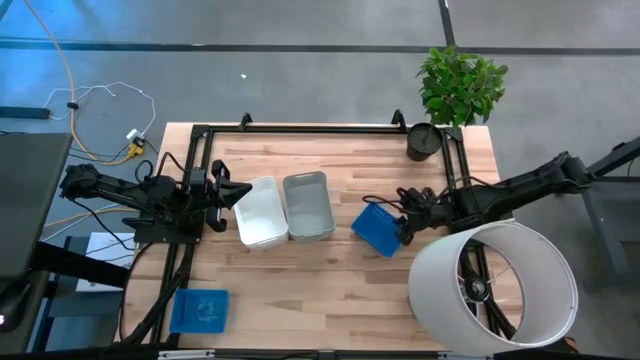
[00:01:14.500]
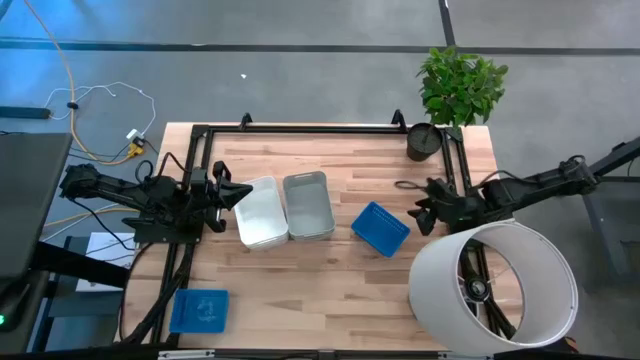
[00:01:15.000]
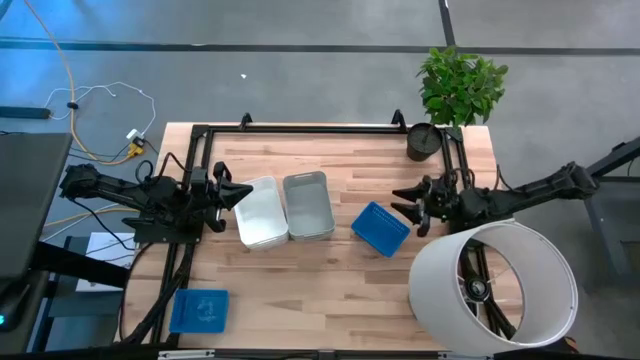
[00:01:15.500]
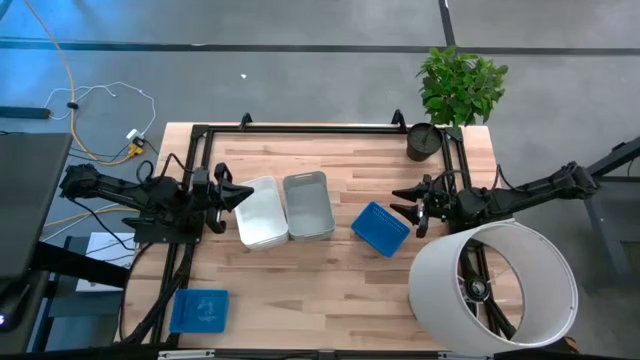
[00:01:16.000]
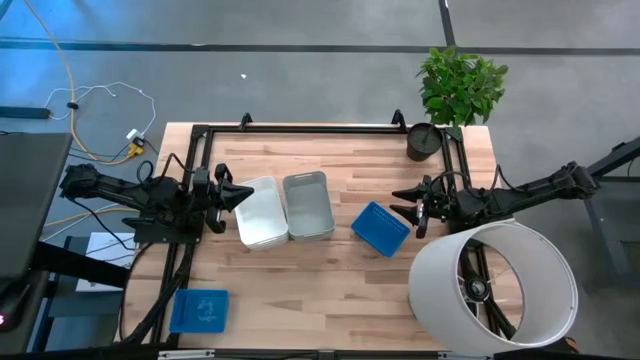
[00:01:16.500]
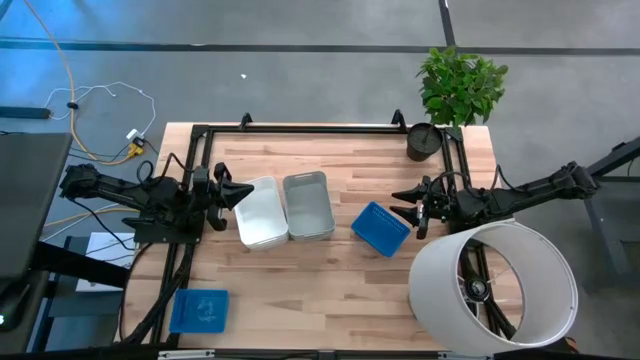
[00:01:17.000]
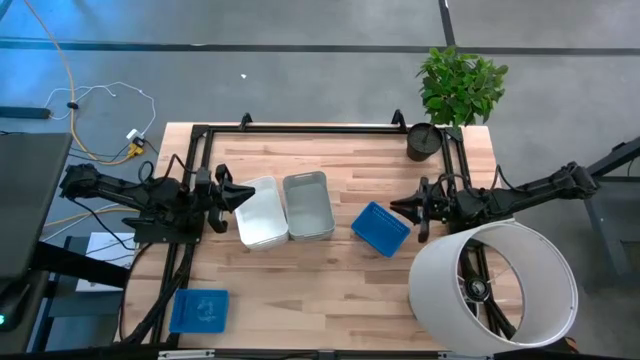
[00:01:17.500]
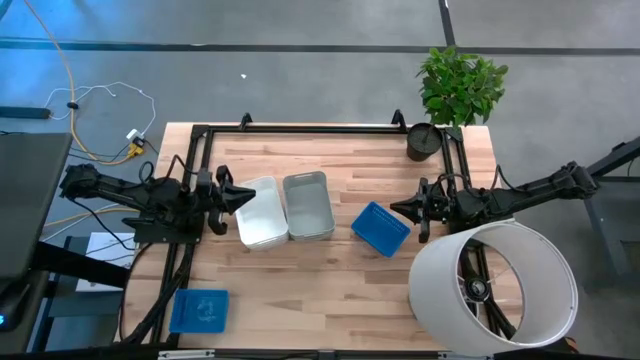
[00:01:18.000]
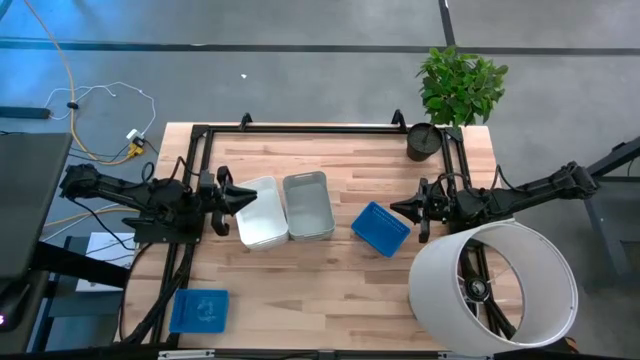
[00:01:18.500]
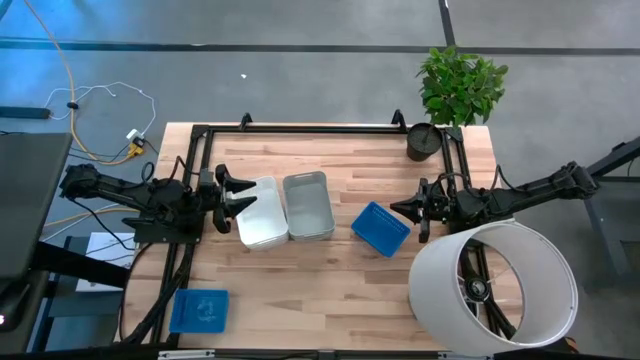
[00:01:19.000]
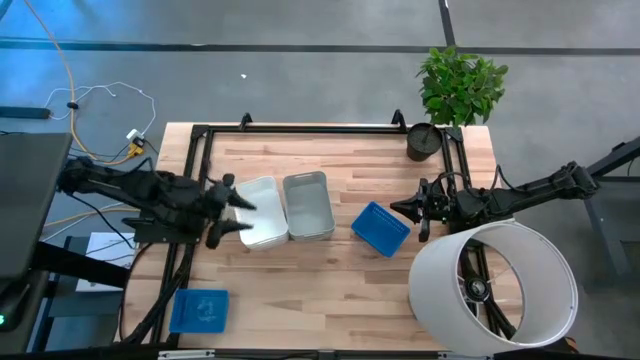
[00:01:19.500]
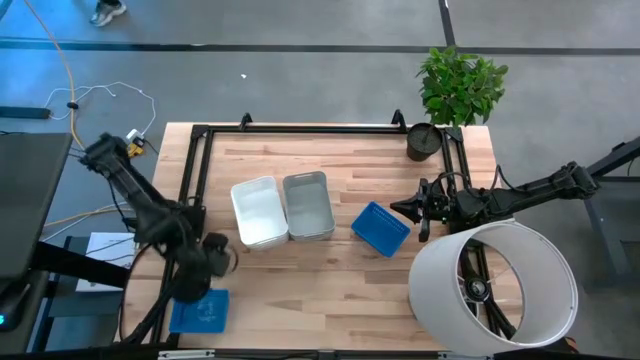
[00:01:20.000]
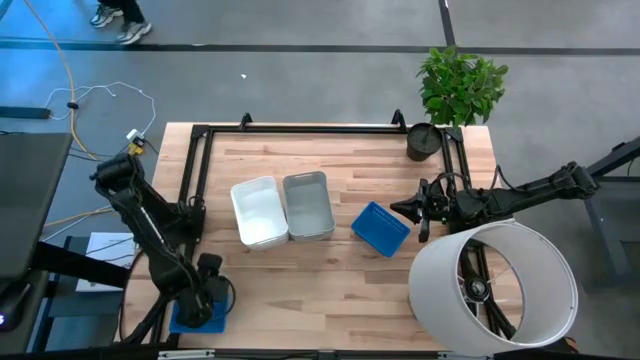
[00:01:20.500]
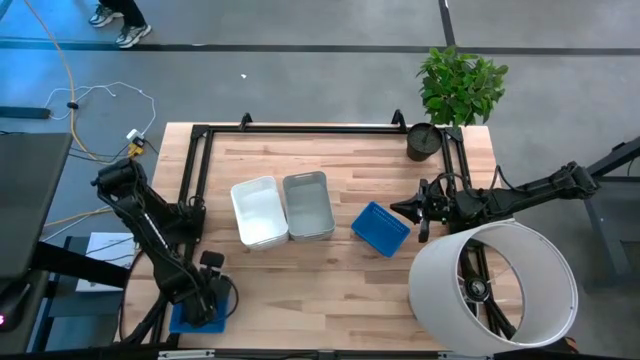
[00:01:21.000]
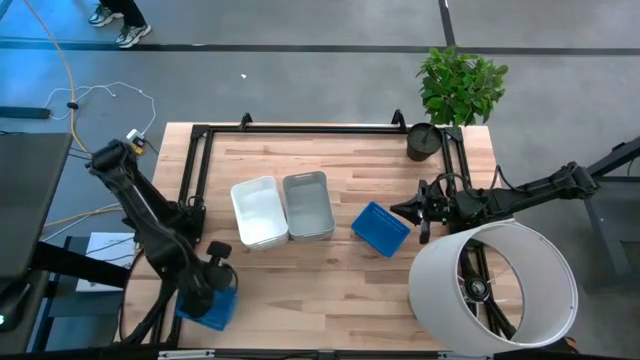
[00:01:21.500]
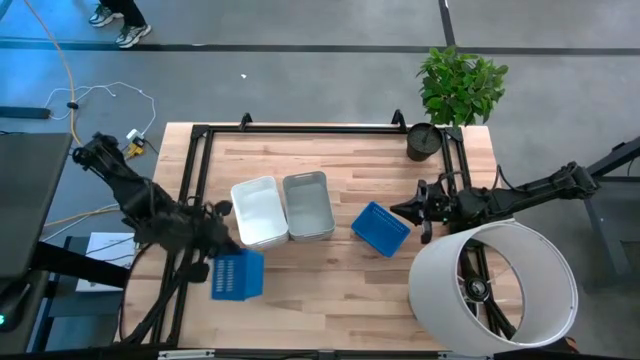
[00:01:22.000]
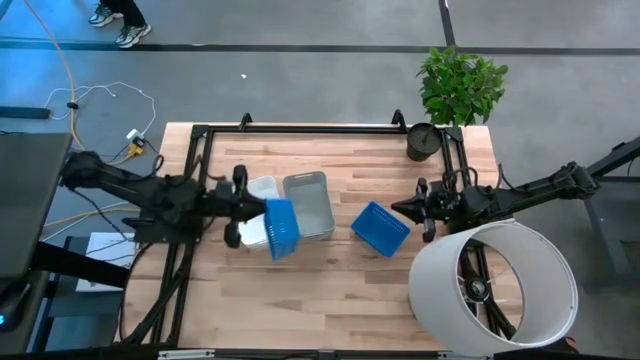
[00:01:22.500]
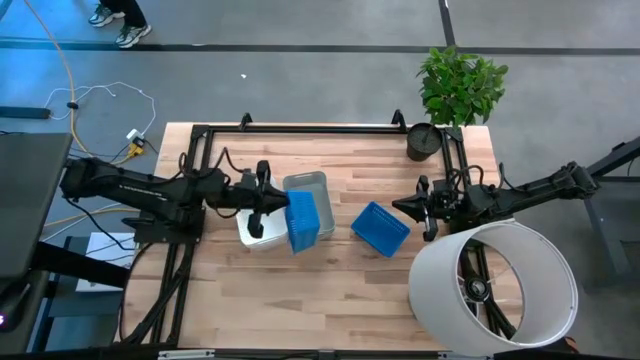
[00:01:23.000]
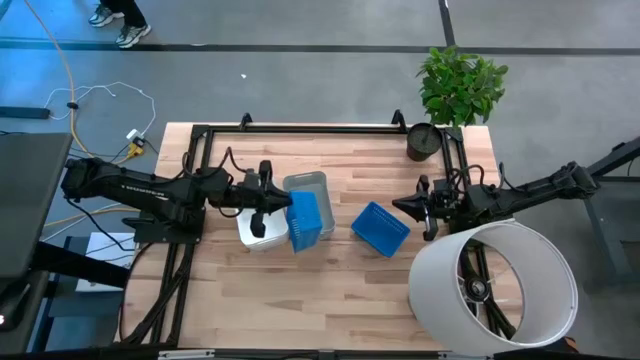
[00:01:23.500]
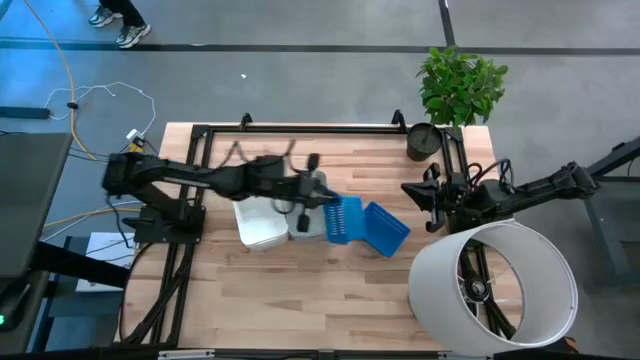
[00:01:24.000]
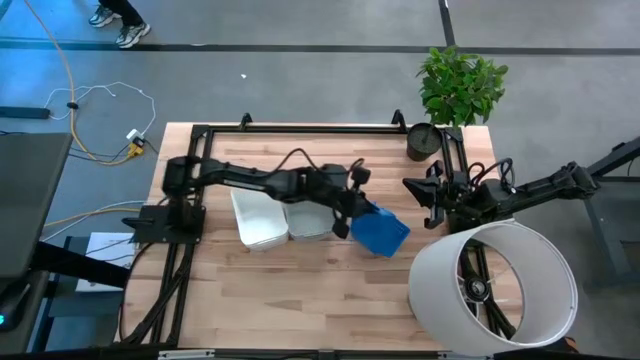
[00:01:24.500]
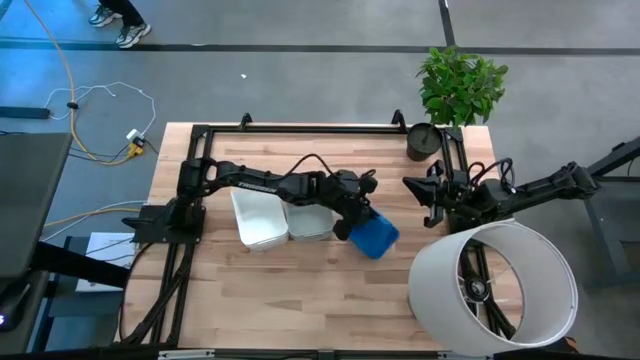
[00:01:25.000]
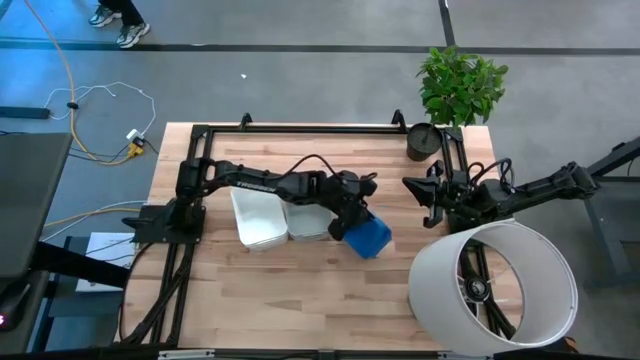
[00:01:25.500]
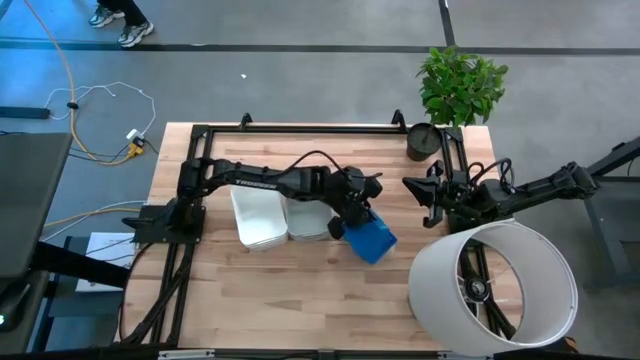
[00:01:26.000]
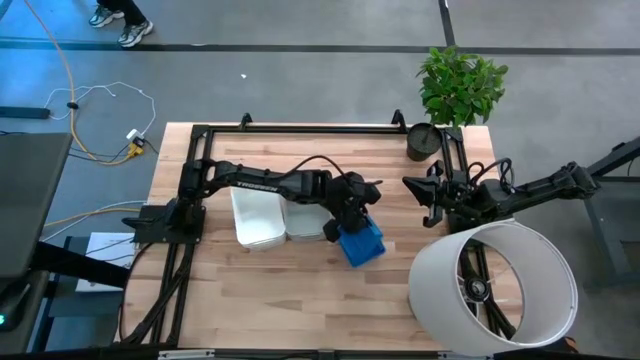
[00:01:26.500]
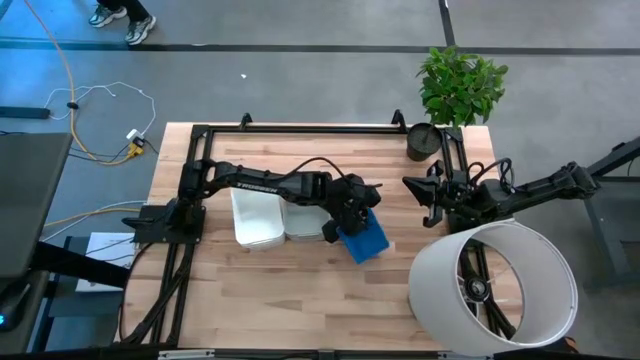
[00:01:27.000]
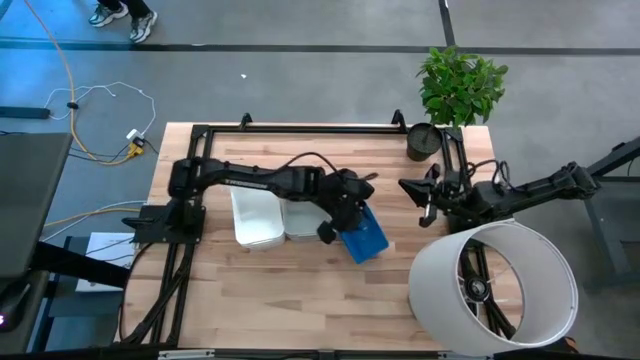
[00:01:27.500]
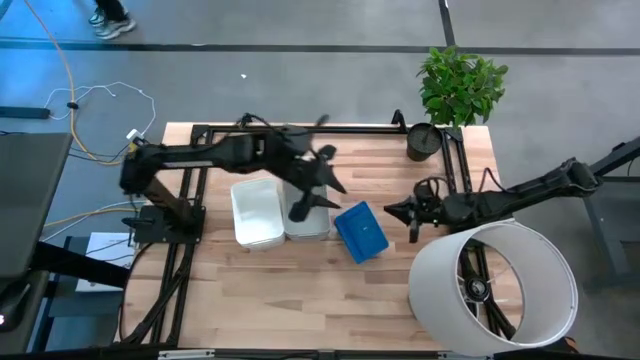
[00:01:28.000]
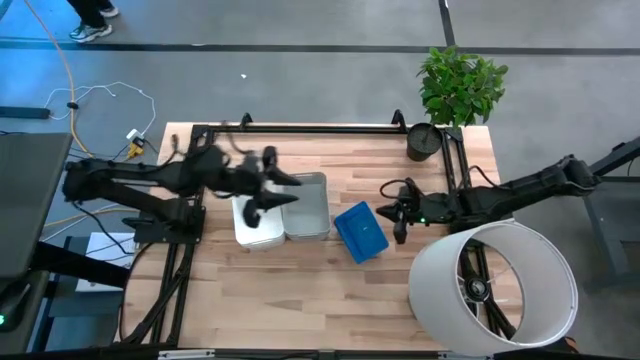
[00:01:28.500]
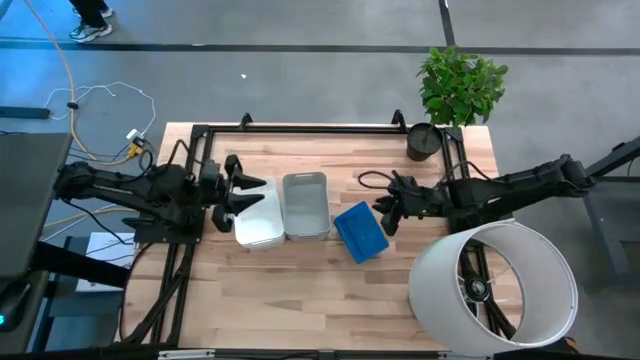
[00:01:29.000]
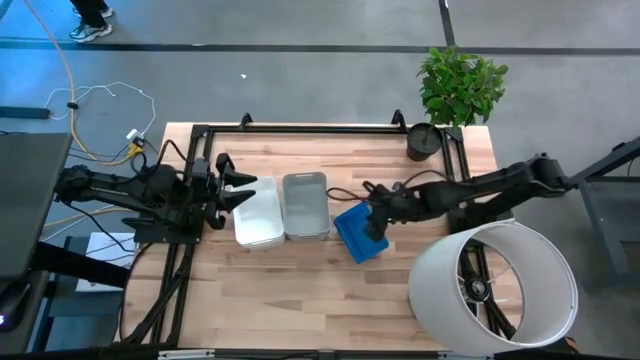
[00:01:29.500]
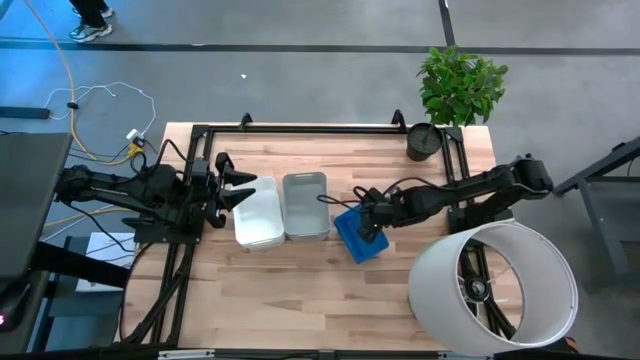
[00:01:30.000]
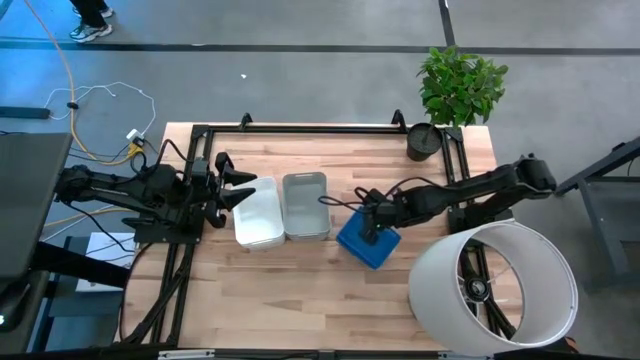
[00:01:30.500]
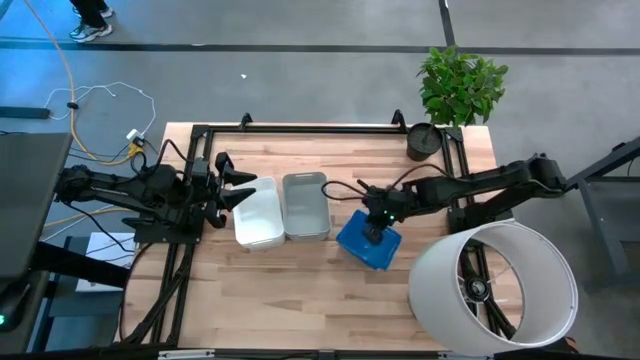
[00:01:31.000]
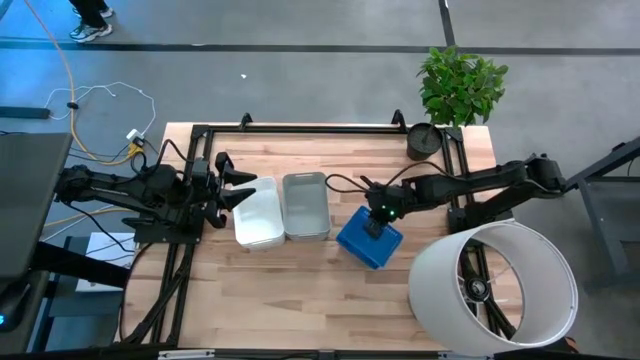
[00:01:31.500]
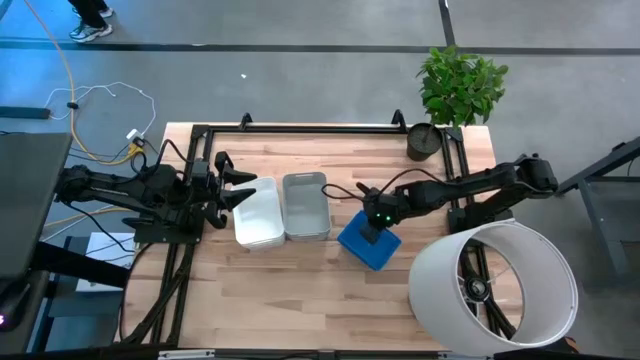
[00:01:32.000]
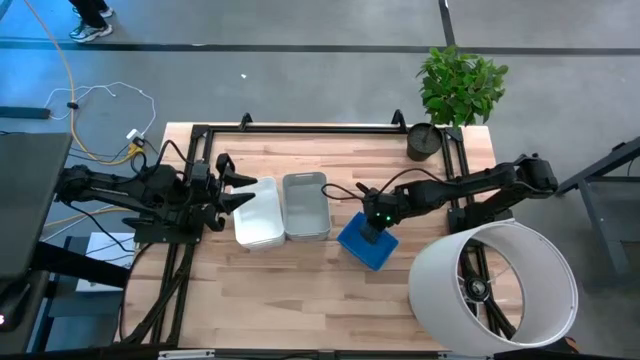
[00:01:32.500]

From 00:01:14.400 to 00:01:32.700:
Stack the bottom blue bin on top of the top blue bins
